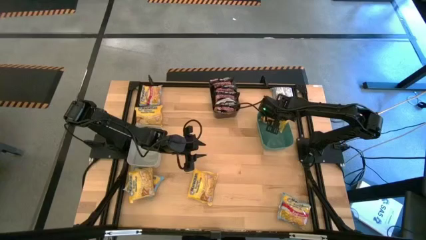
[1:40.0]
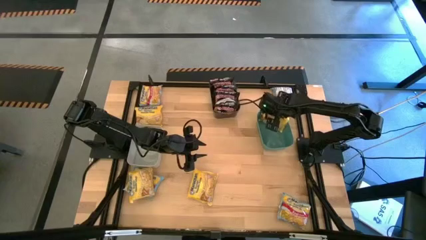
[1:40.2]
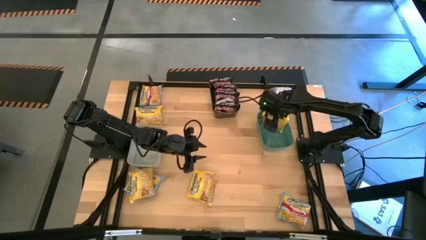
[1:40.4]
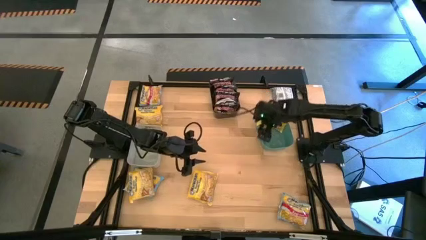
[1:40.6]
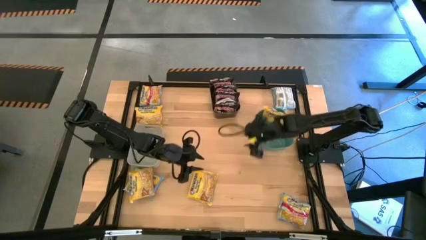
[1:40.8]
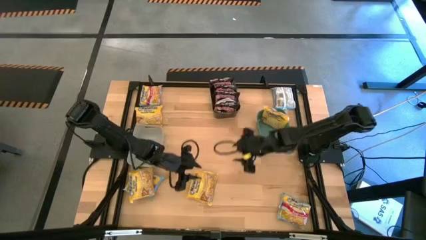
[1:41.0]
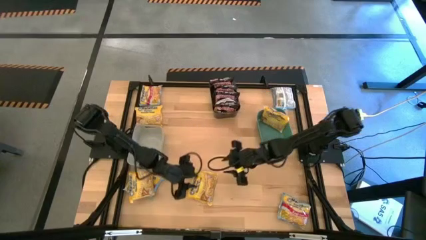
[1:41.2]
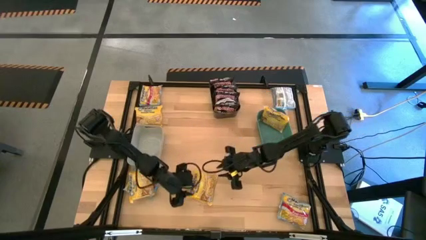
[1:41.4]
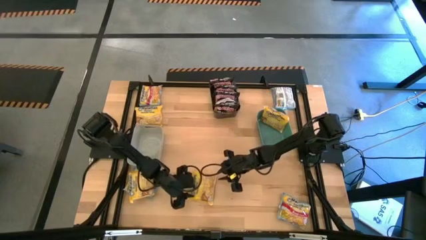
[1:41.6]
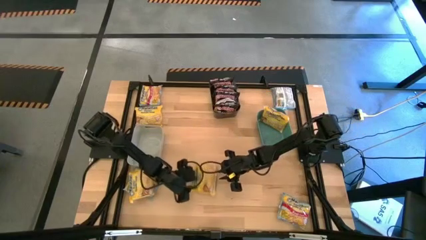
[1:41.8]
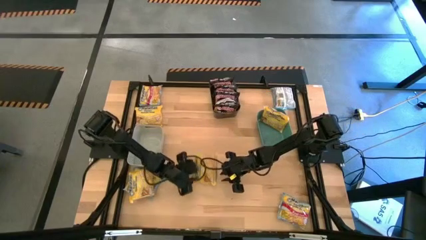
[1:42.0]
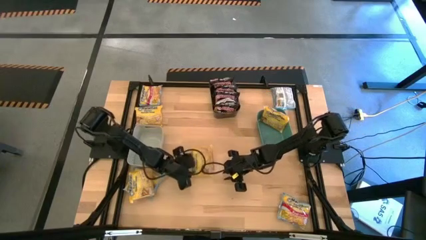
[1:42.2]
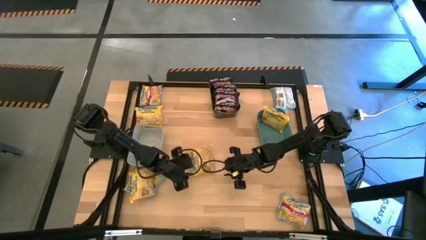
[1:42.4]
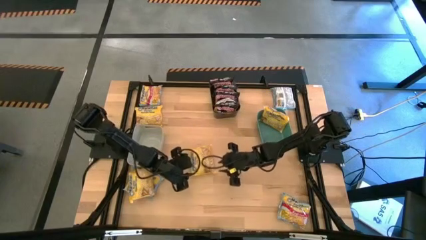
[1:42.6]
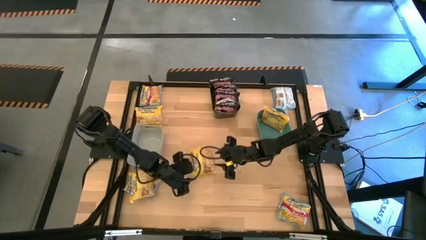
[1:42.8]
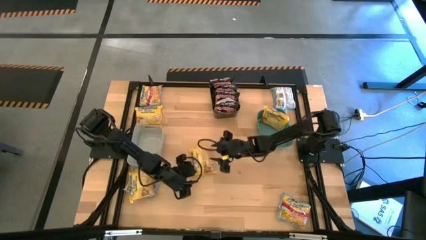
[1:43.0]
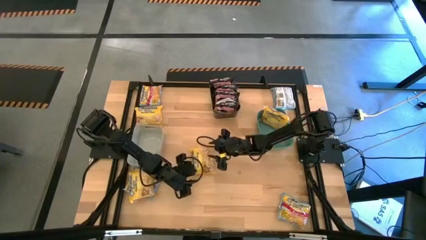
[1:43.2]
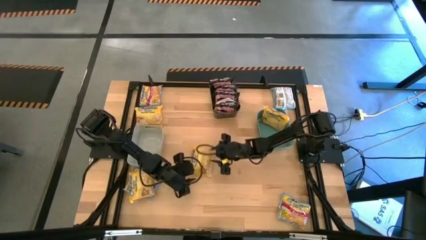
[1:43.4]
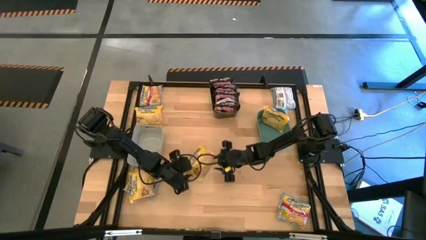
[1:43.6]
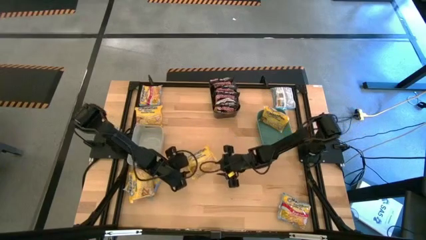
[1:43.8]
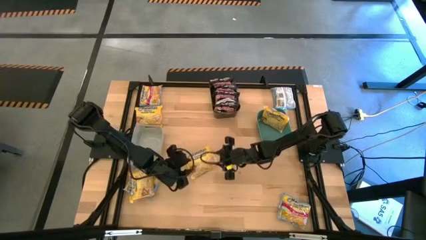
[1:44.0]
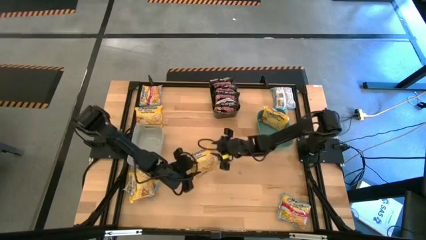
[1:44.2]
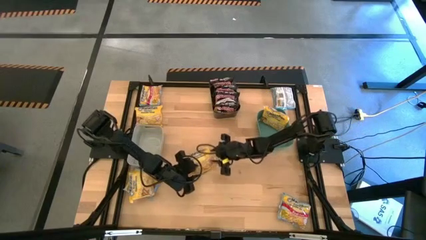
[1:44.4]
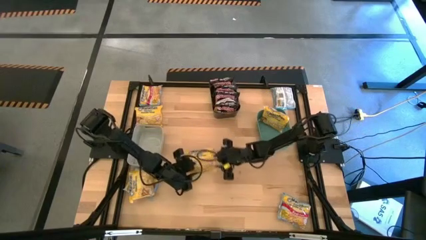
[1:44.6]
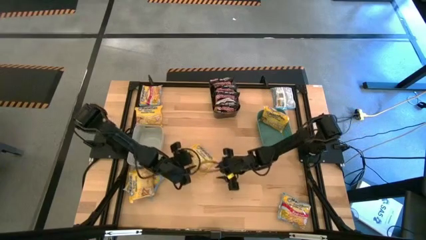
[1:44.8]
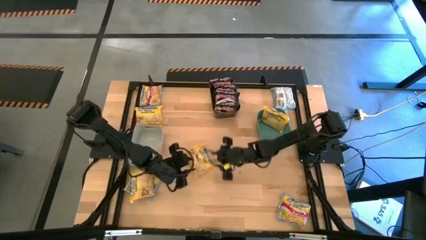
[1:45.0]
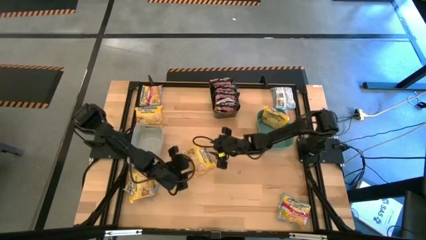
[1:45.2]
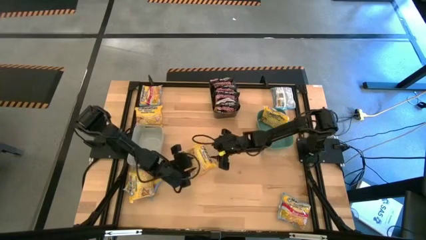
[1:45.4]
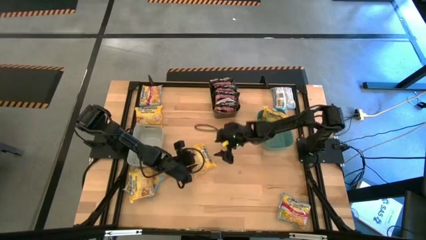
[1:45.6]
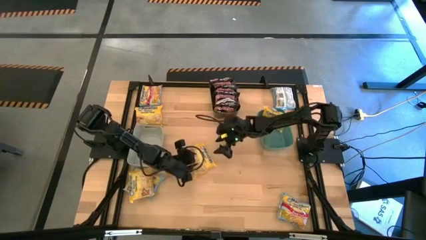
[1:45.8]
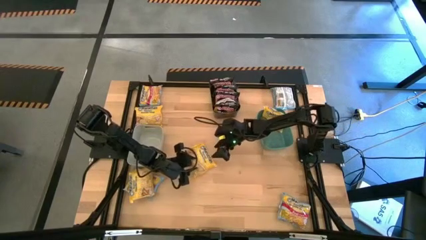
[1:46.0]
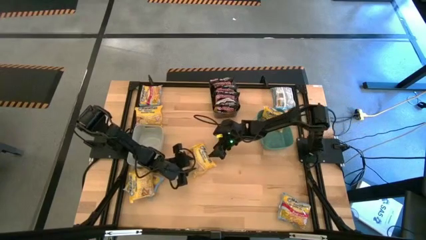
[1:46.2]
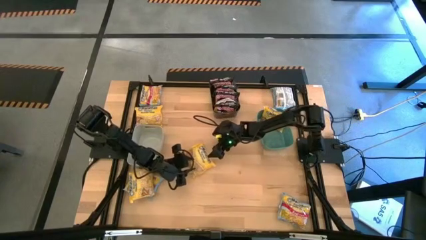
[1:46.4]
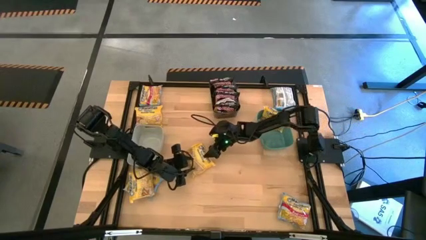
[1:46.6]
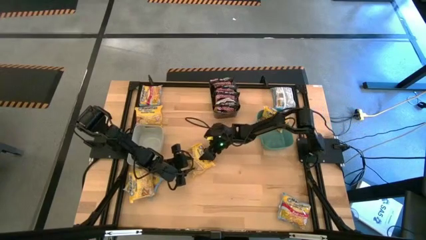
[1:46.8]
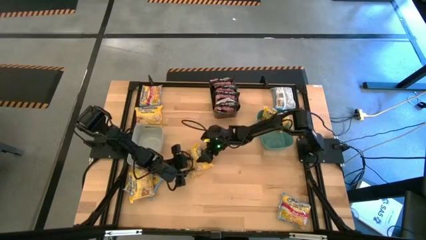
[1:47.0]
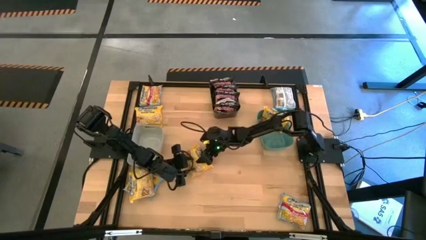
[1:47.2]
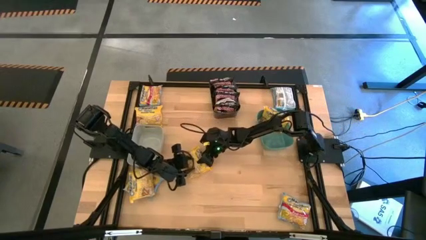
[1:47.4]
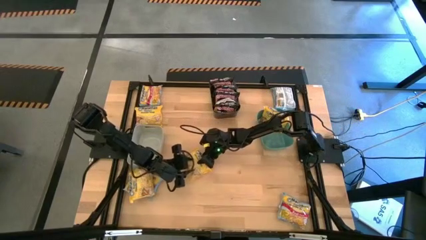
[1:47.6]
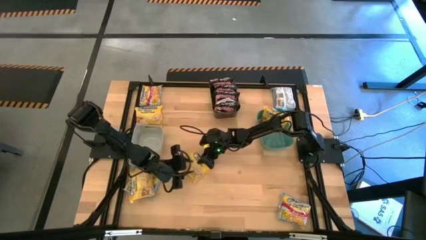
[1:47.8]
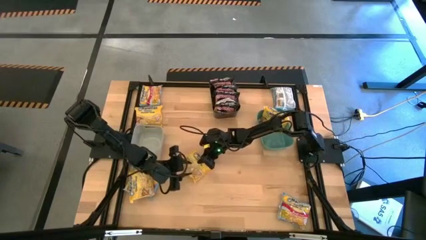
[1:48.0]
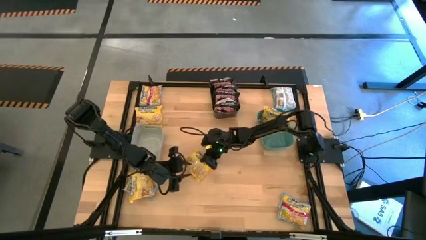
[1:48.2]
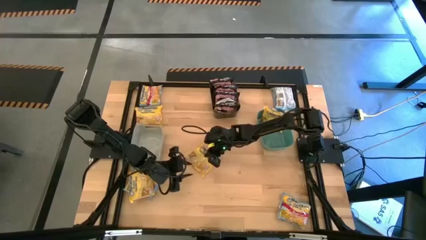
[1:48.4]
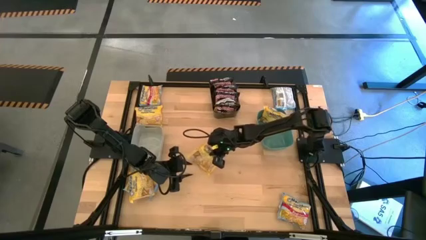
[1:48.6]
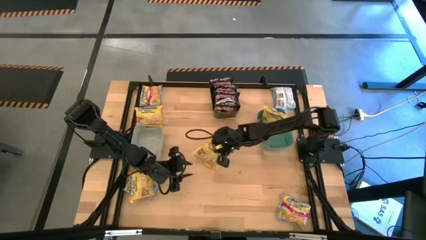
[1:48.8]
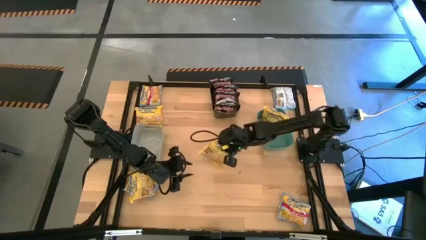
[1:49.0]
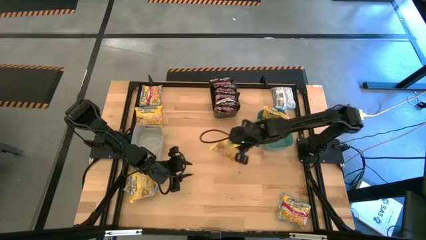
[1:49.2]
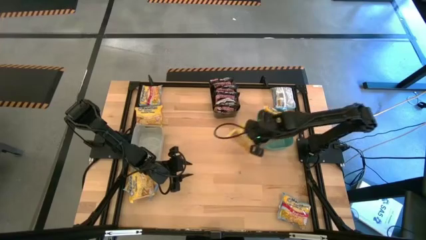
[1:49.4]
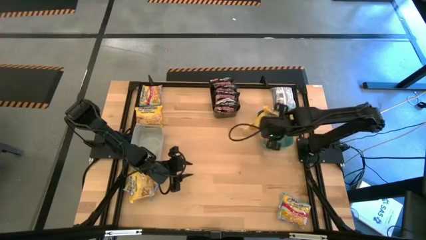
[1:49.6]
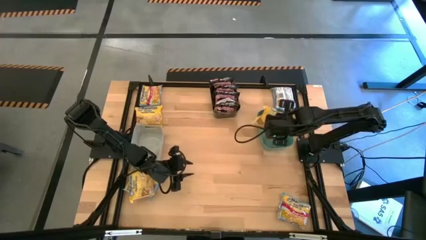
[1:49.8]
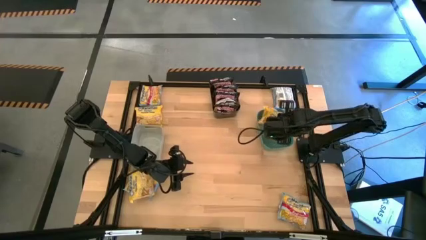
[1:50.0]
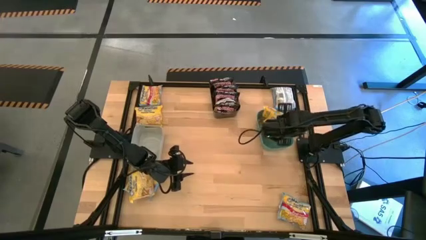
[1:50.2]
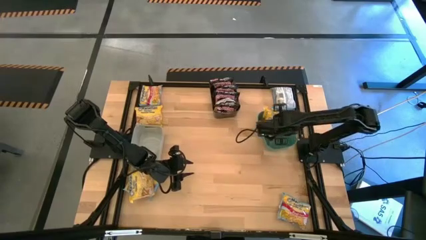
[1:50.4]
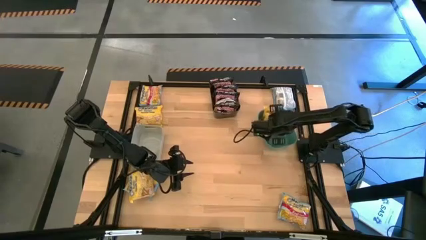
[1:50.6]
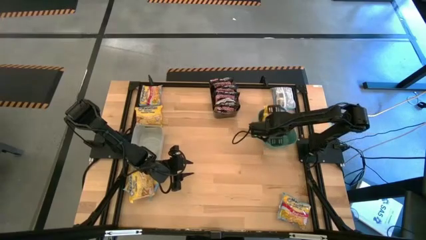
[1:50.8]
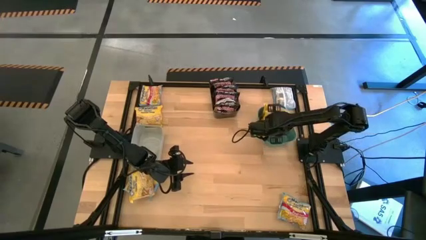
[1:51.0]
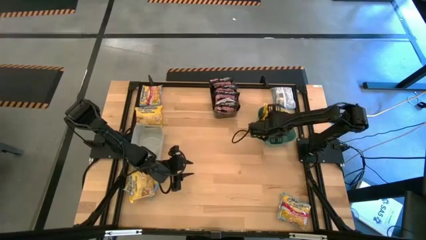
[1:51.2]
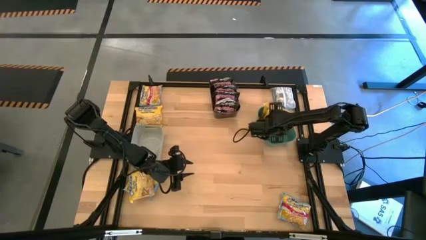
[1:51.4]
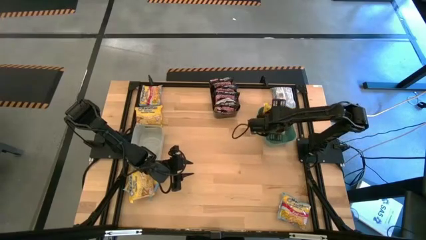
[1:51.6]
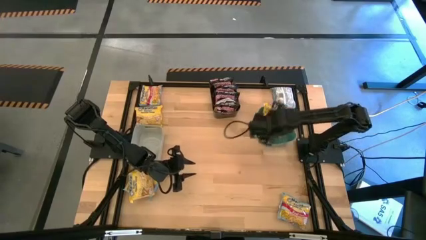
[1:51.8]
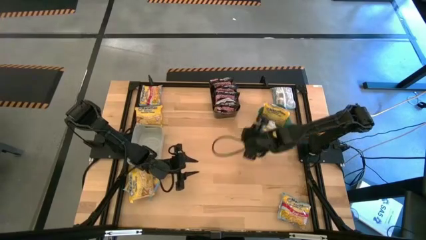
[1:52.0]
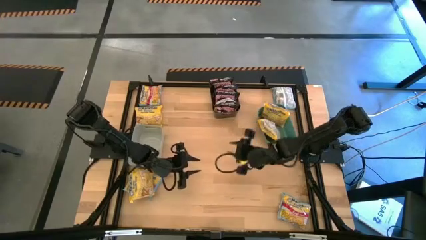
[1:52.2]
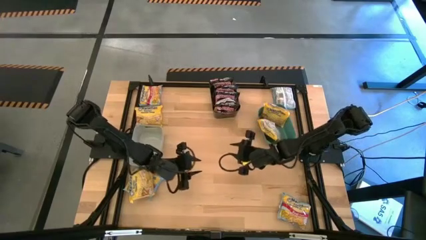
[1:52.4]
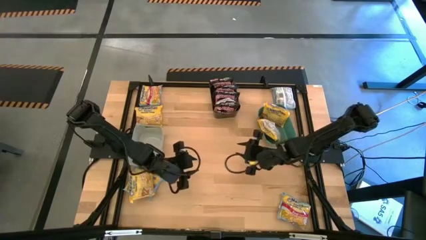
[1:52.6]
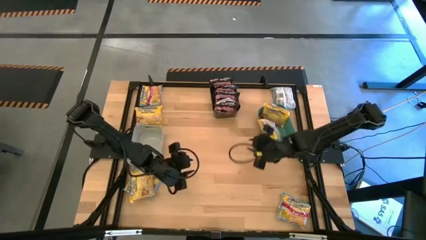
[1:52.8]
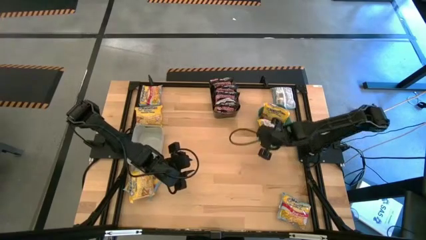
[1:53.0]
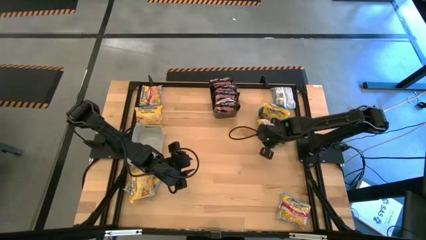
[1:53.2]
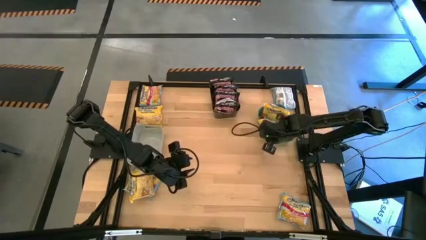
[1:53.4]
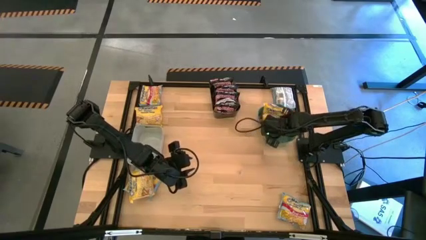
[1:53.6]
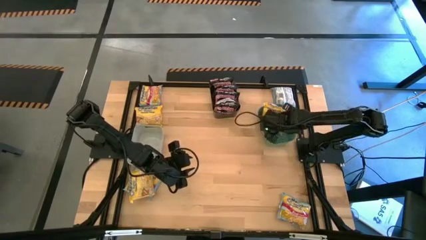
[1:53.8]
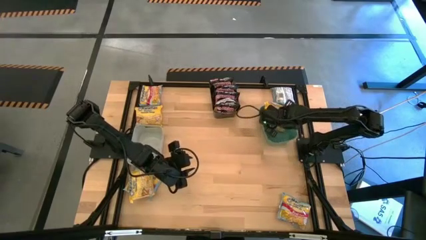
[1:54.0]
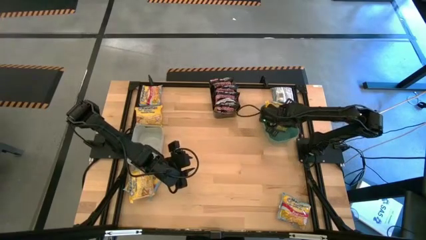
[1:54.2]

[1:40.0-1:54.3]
Task: Sort Maruchan noodles
Put the yellow noodle pack into the blue bin
